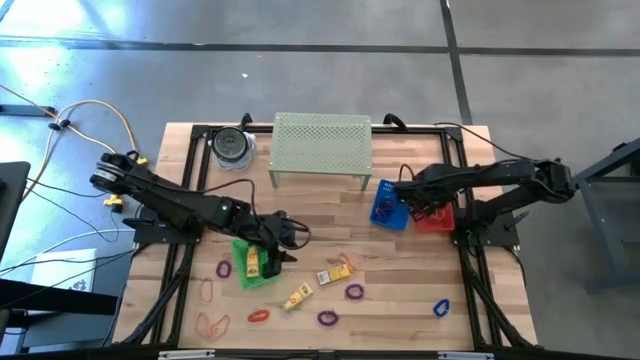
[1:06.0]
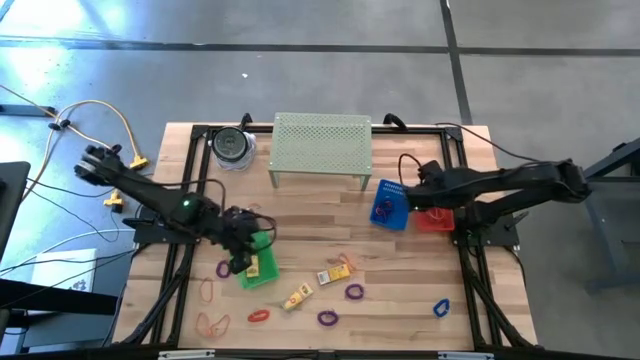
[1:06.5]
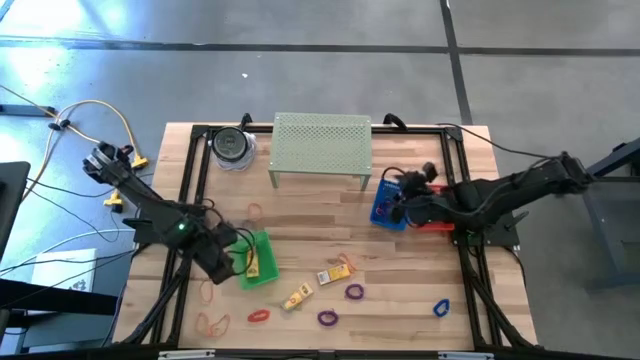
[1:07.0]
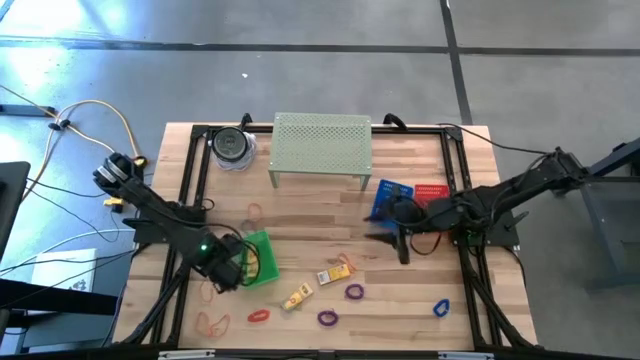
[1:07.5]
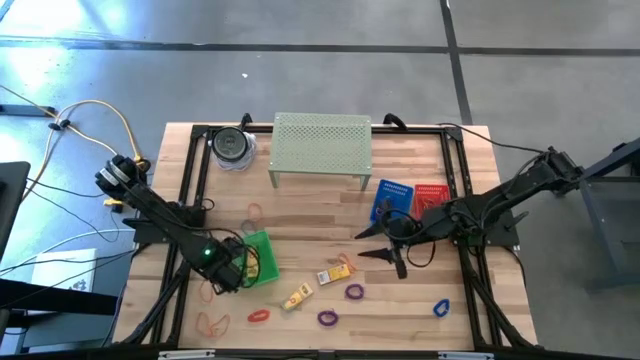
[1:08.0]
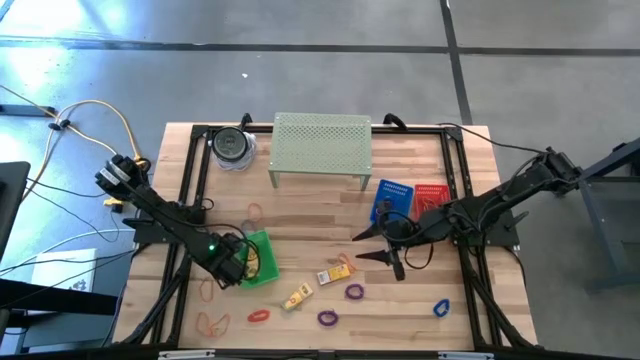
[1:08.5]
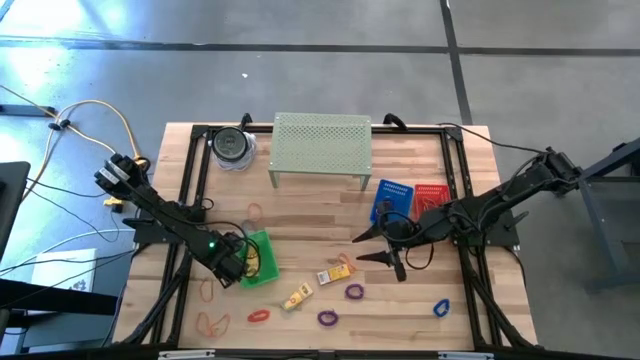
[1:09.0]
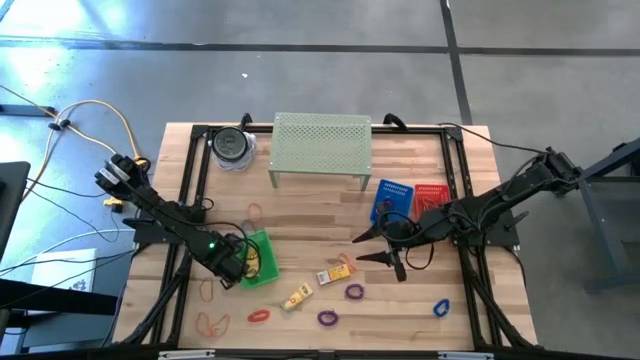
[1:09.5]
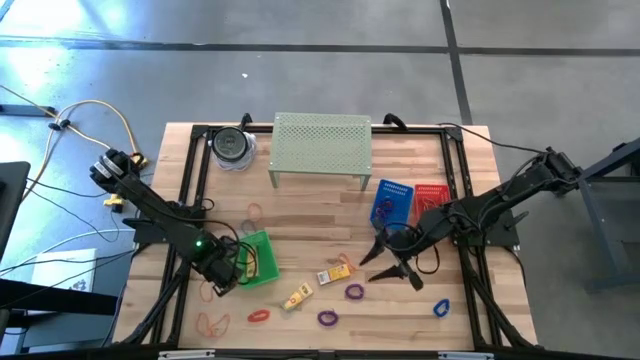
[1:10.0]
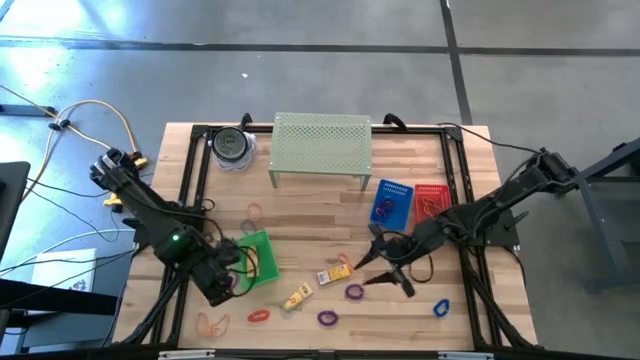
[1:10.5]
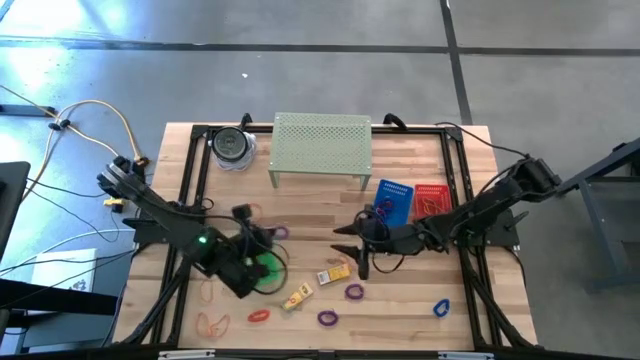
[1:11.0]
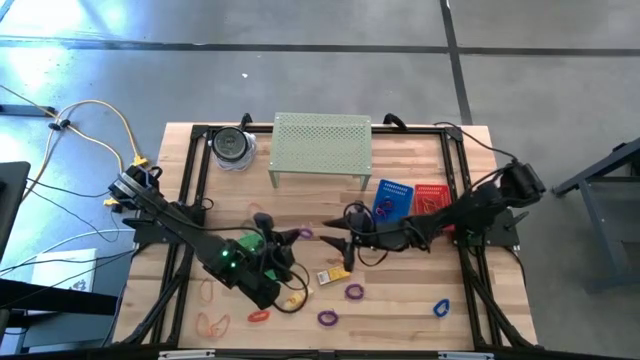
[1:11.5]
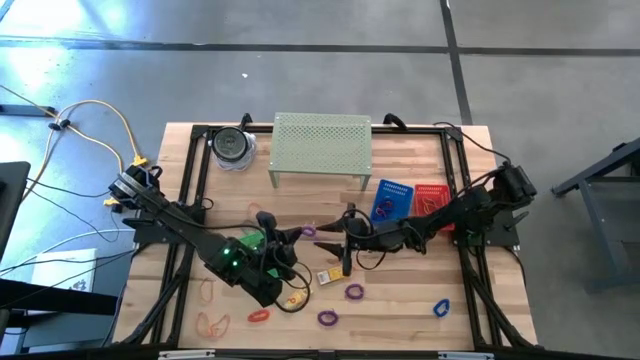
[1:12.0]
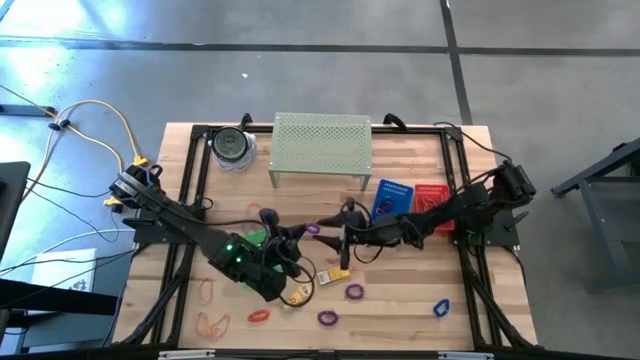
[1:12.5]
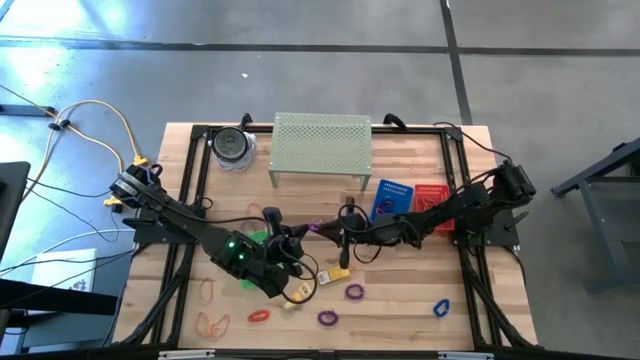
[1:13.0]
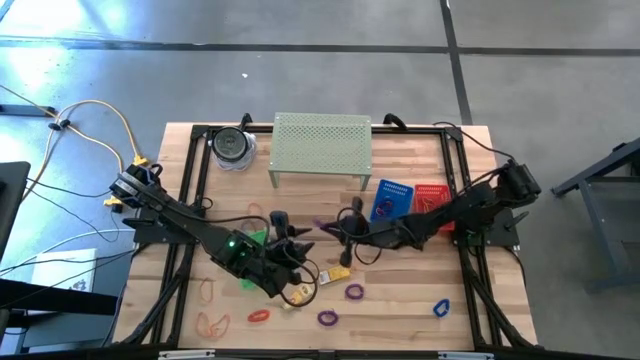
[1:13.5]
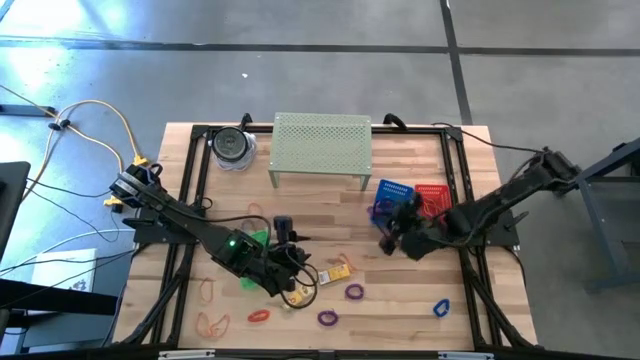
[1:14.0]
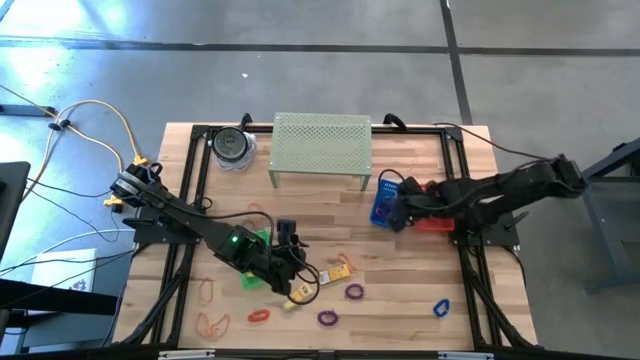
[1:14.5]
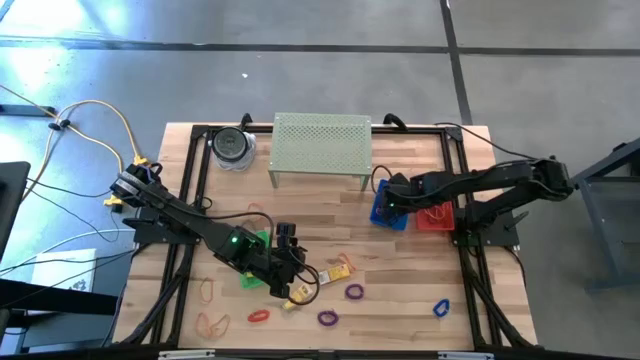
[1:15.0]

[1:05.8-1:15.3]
Task: Pick & Place Office Desk Supplies
Put the violet spring keychain into the blue bin

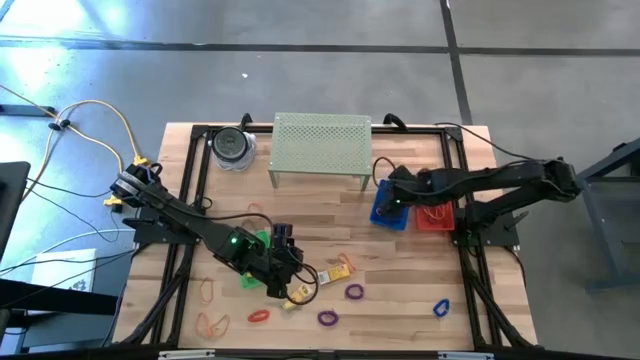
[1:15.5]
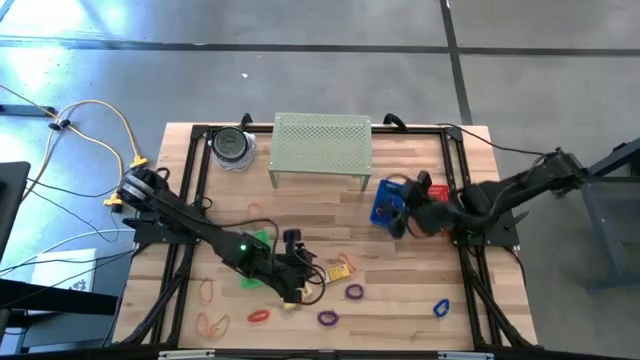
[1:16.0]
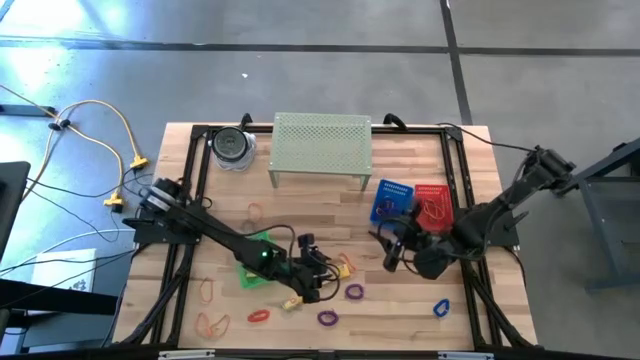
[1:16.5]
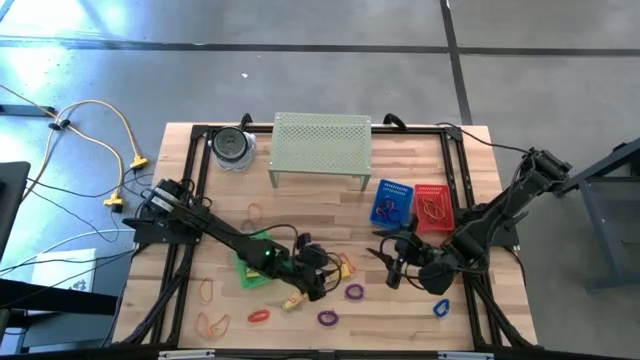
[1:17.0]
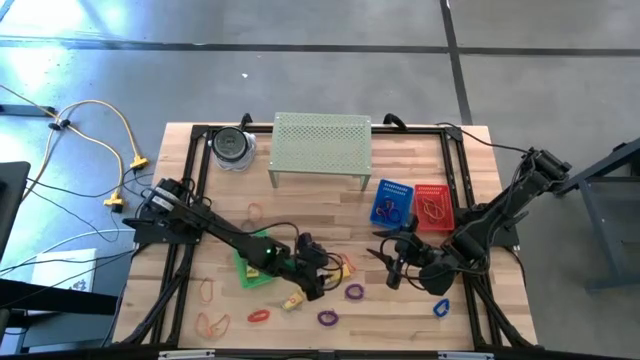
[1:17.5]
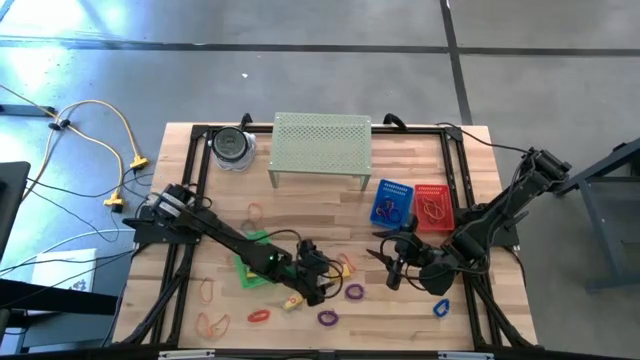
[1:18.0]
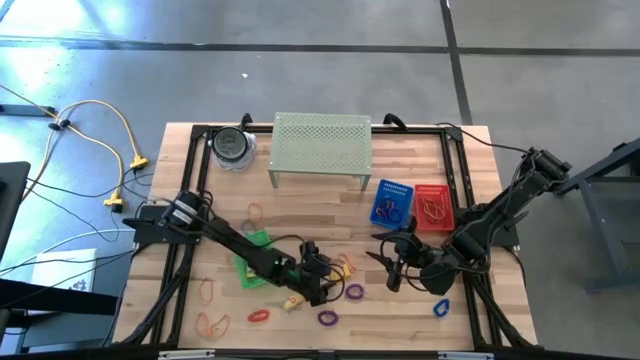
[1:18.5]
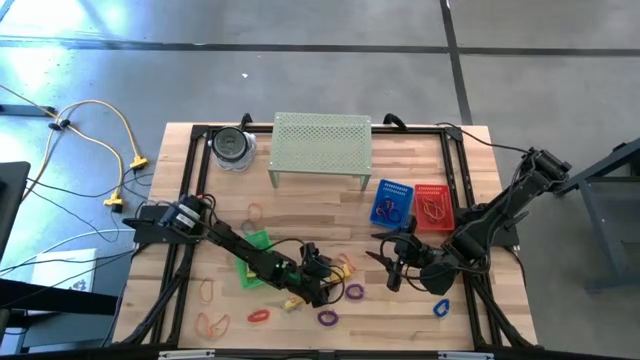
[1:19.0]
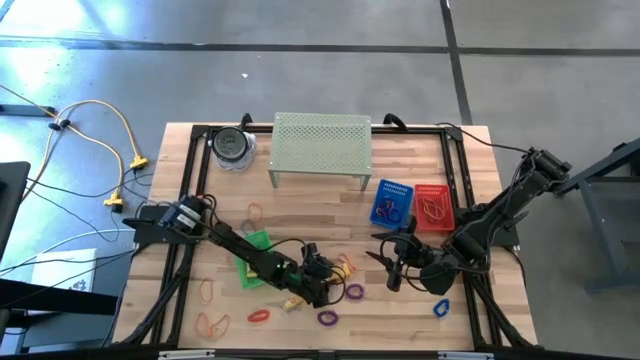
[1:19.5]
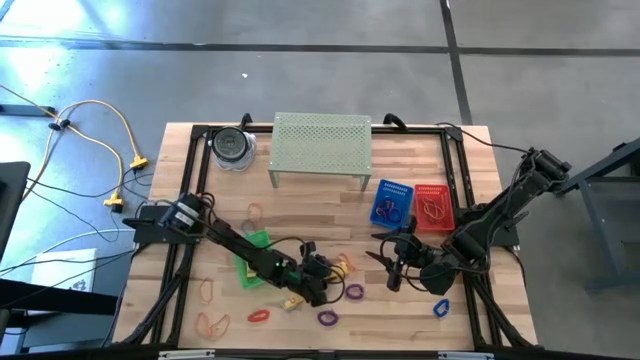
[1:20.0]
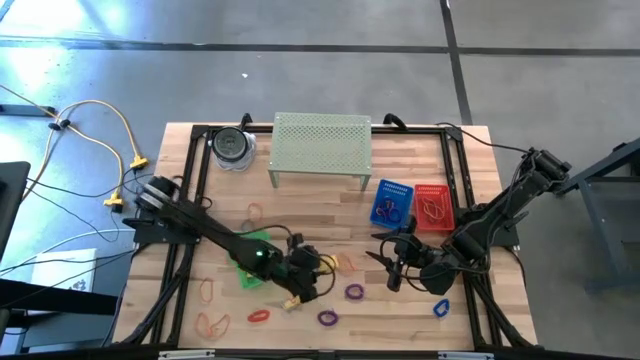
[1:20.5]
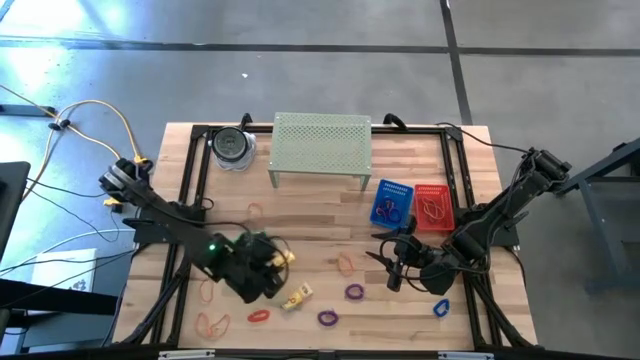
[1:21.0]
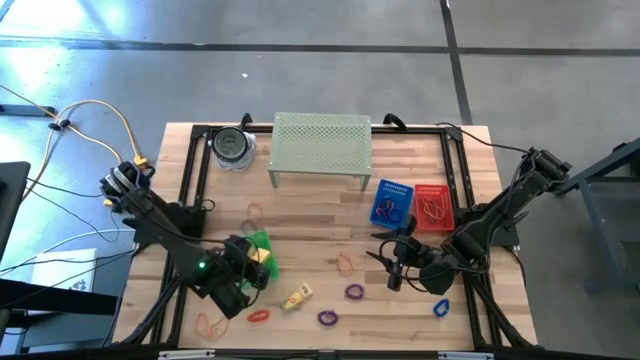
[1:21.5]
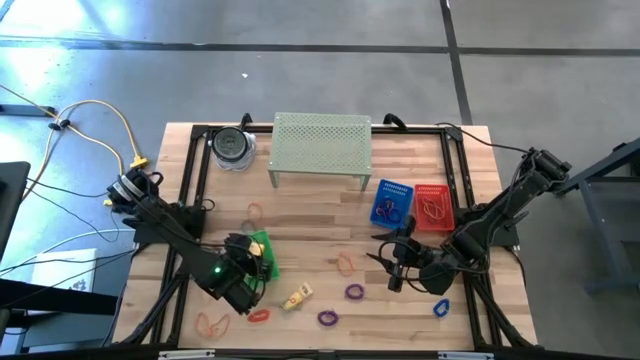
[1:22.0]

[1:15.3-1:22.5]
Put the crayon box into the green bin

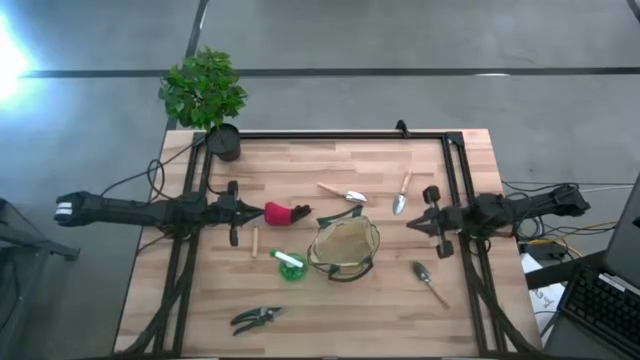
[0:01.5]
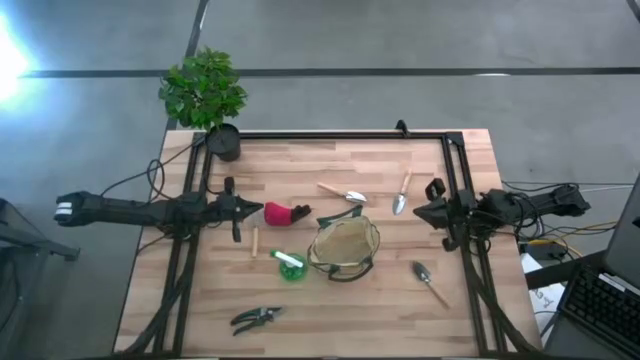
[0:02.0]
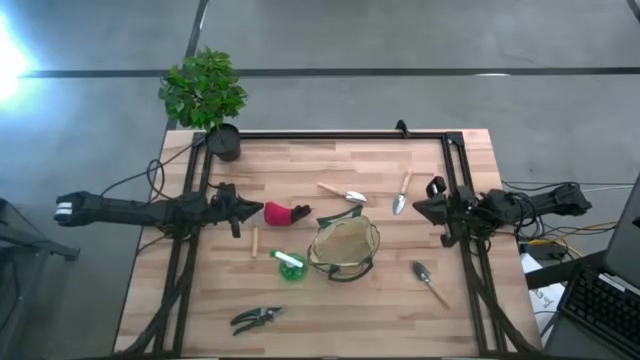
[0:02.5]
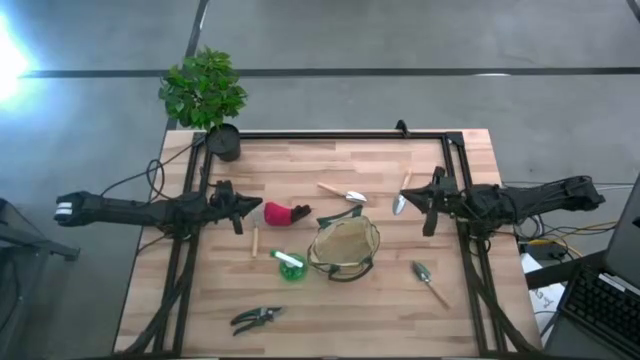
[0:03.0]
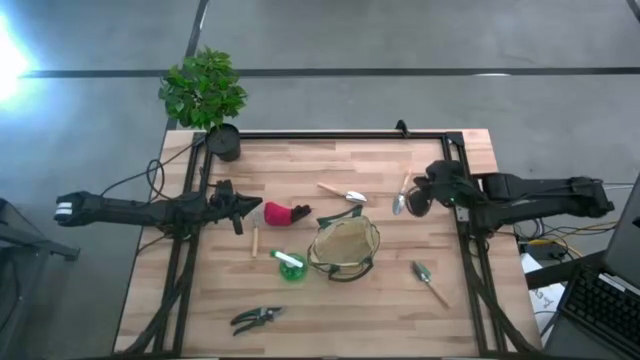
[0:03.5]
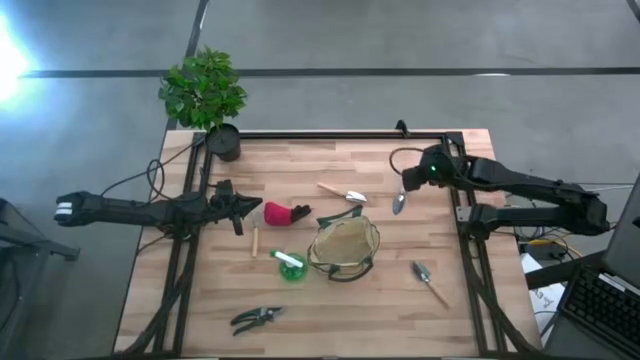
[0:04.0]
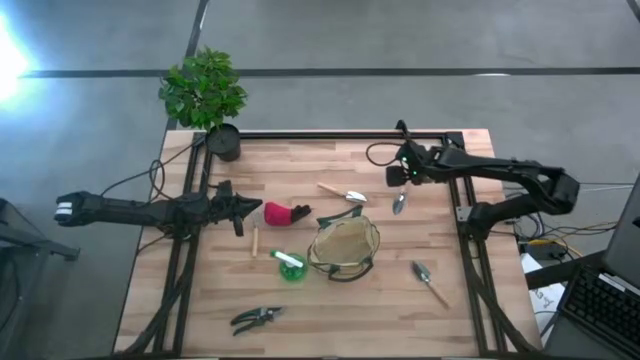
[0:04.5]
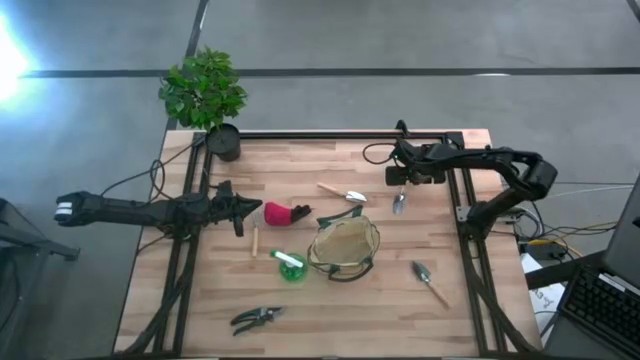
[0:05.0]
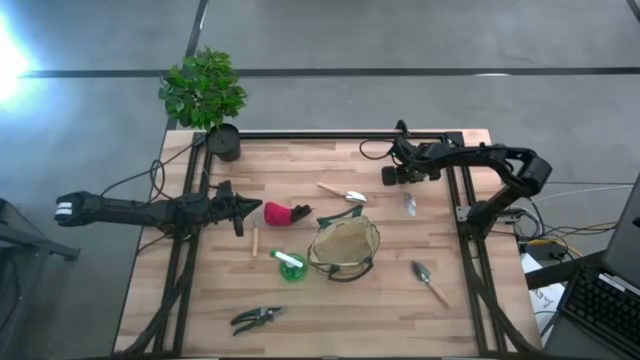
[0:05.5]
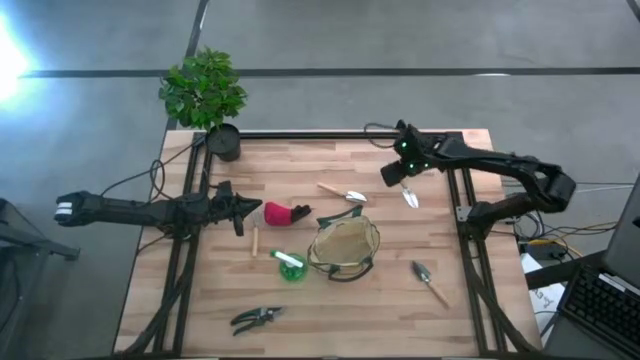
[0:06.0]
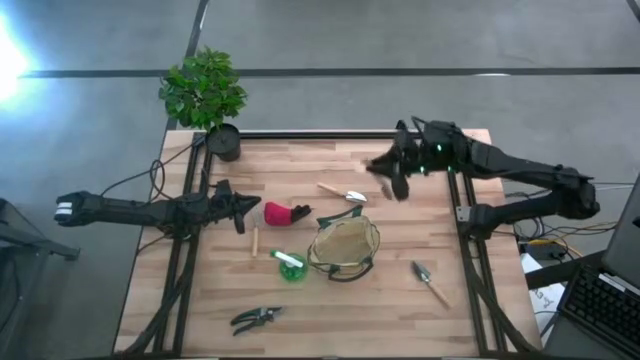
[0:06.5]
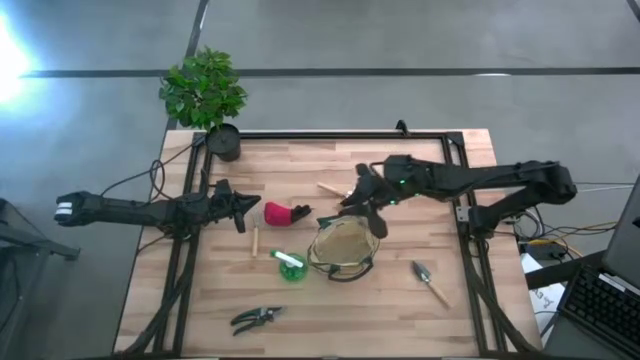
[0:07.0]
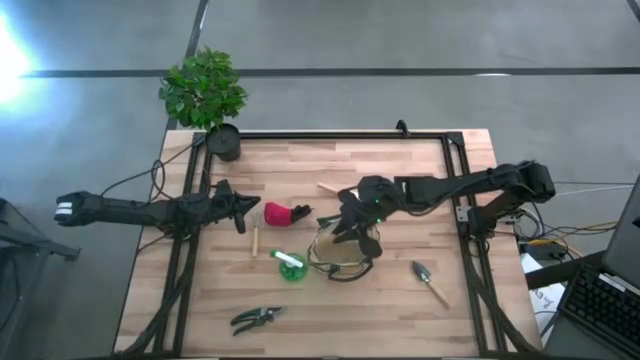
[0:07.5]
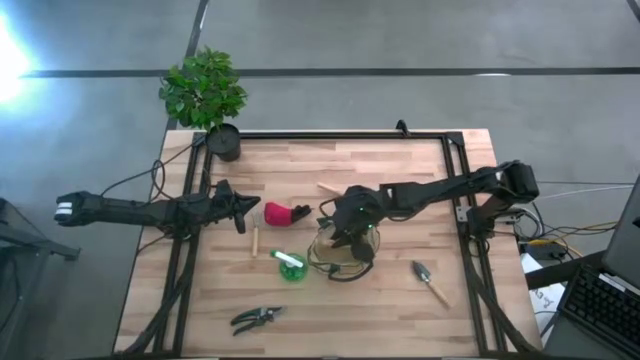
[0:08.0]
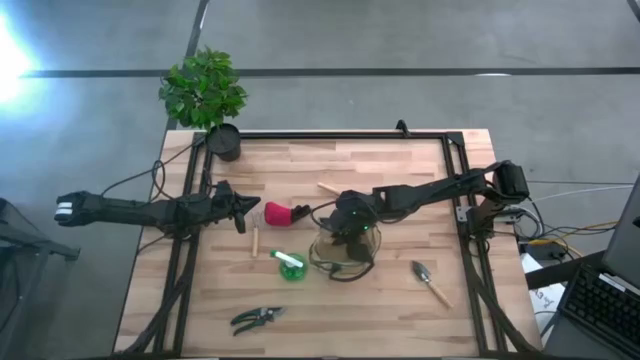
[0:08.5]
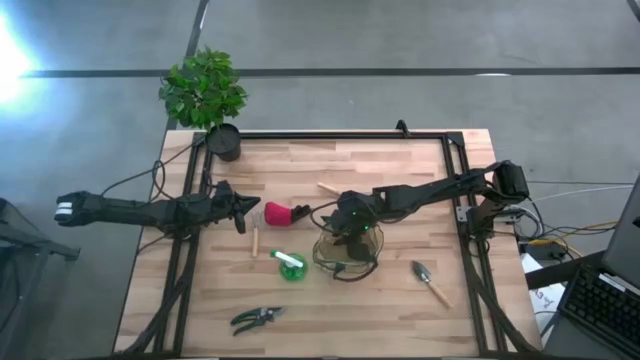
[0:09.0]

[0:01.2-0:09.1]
Task: Pick & Place Garden tools in Gardening bag
Put the top right brown trowel into the gardening bag
